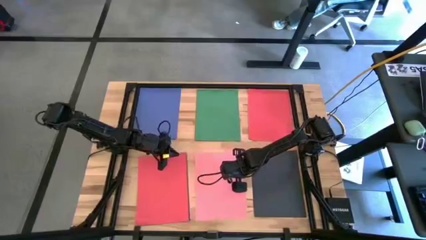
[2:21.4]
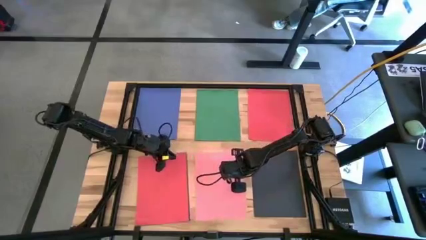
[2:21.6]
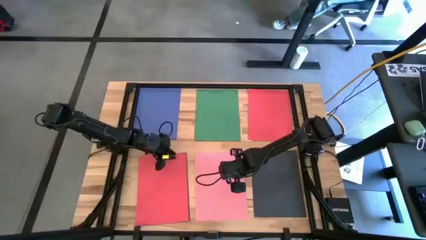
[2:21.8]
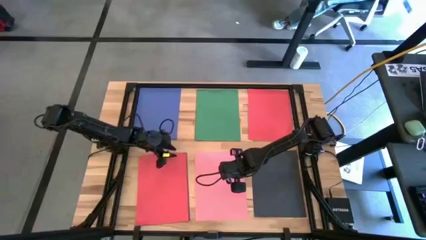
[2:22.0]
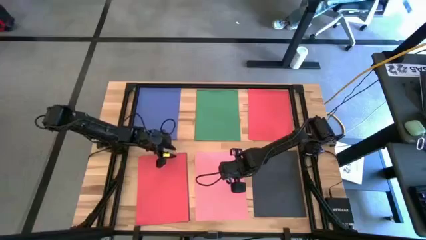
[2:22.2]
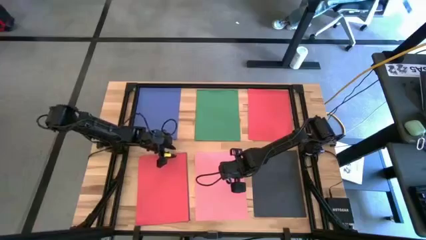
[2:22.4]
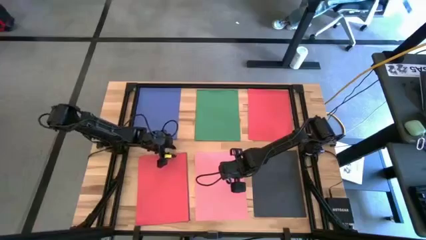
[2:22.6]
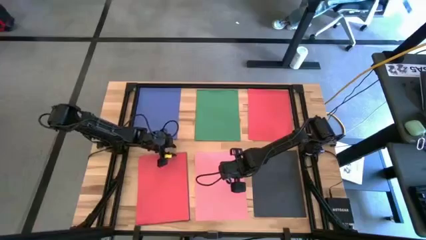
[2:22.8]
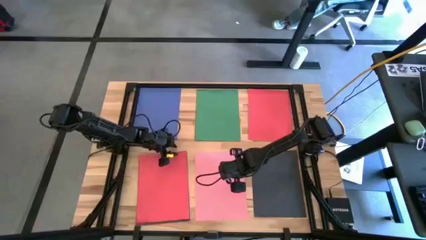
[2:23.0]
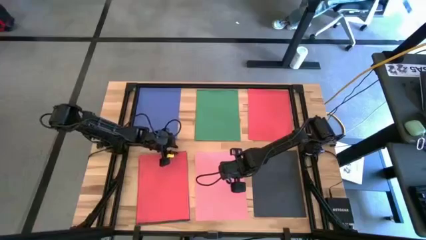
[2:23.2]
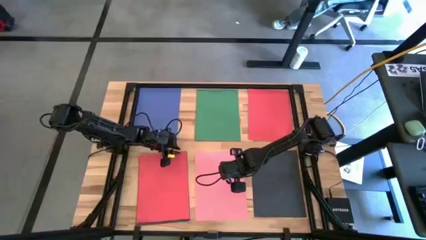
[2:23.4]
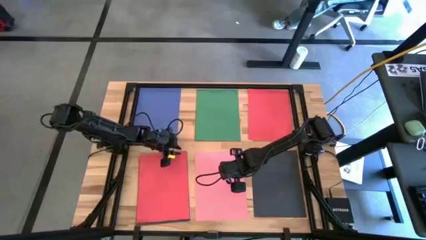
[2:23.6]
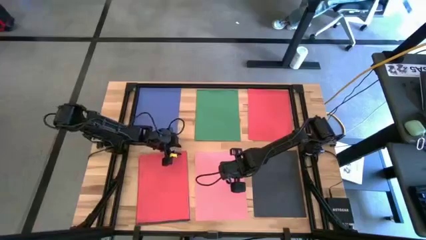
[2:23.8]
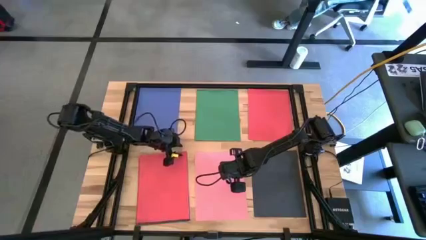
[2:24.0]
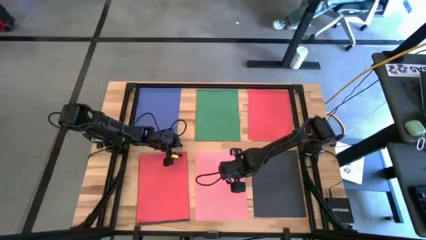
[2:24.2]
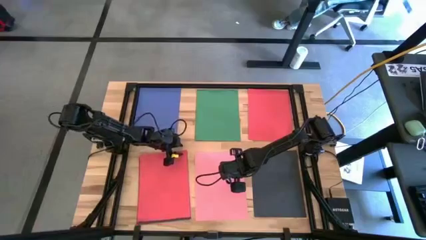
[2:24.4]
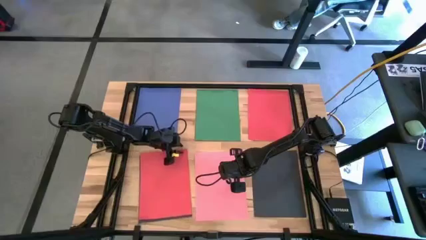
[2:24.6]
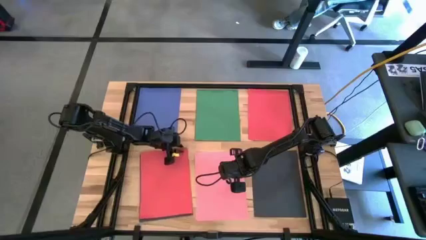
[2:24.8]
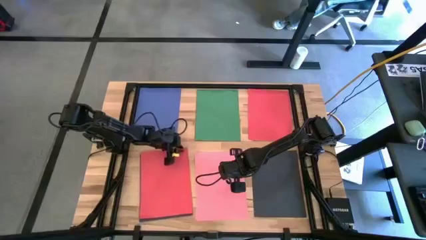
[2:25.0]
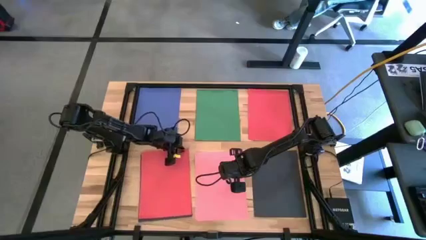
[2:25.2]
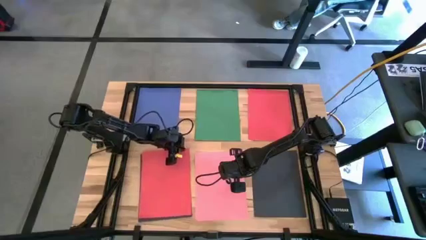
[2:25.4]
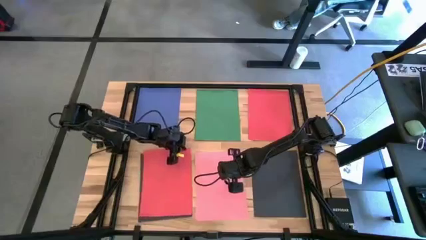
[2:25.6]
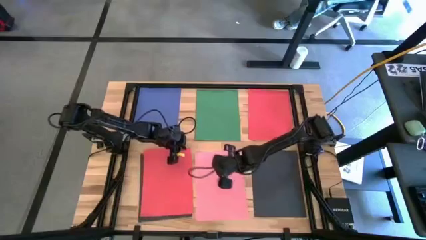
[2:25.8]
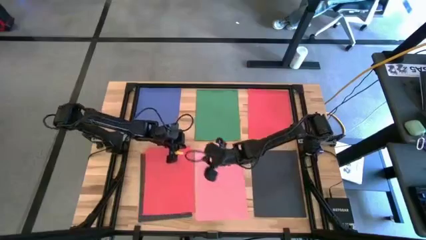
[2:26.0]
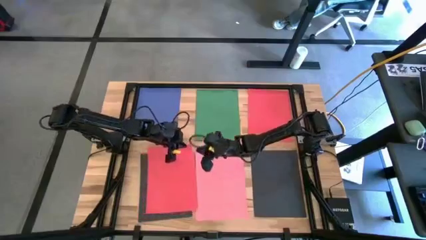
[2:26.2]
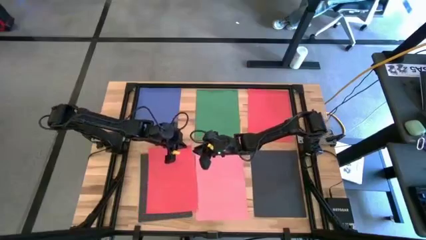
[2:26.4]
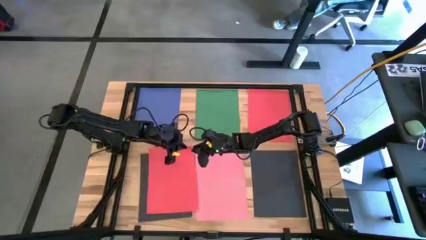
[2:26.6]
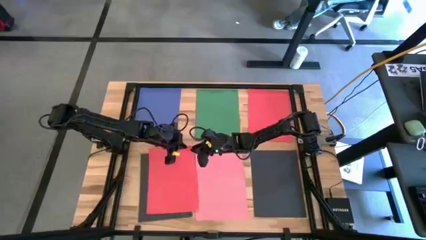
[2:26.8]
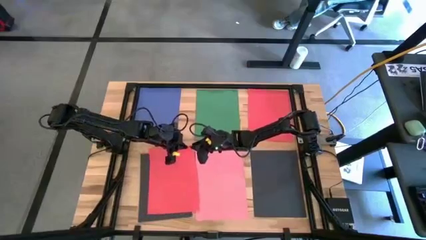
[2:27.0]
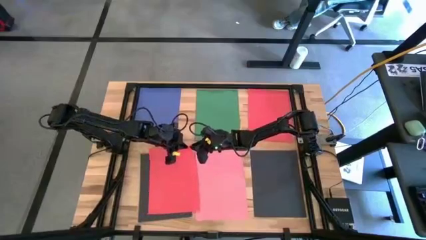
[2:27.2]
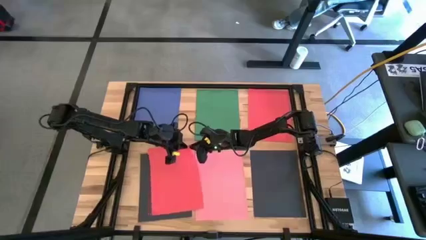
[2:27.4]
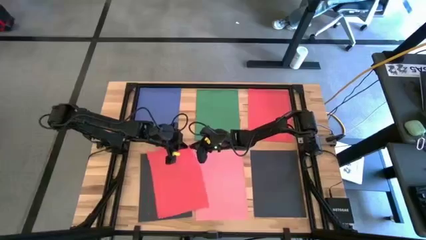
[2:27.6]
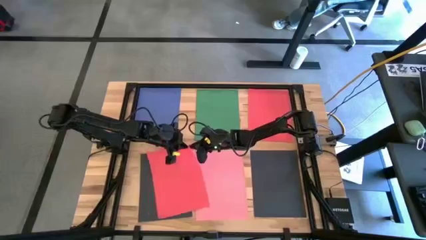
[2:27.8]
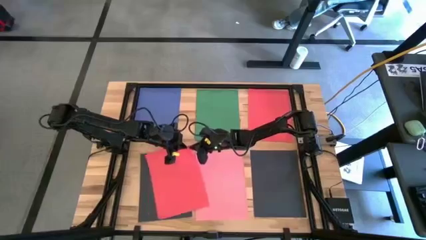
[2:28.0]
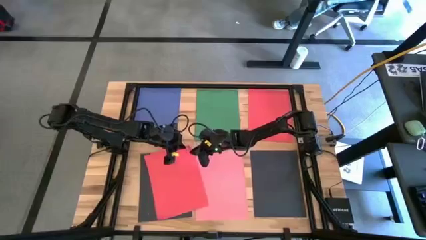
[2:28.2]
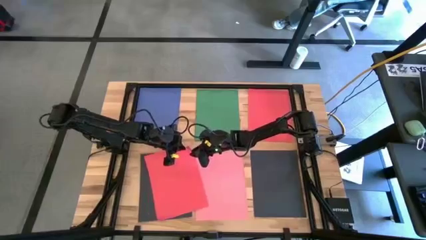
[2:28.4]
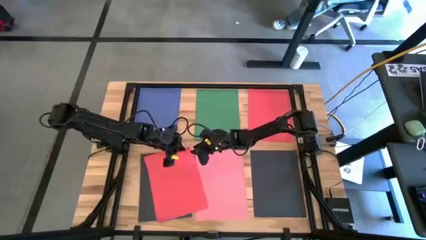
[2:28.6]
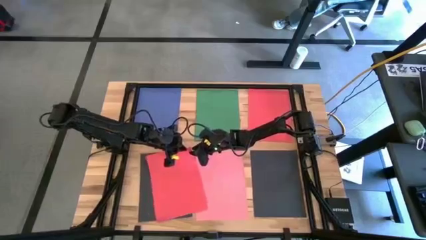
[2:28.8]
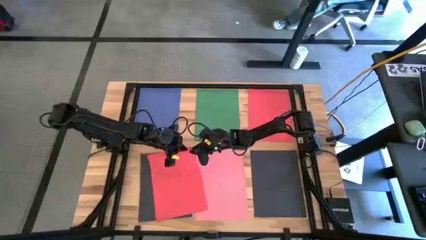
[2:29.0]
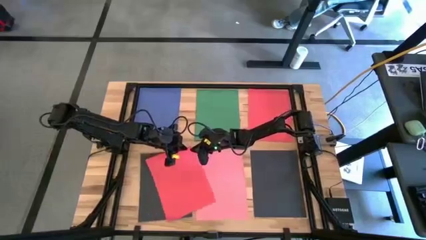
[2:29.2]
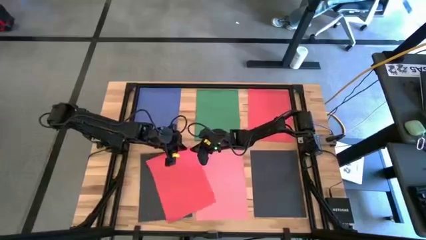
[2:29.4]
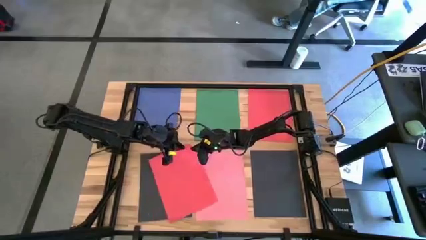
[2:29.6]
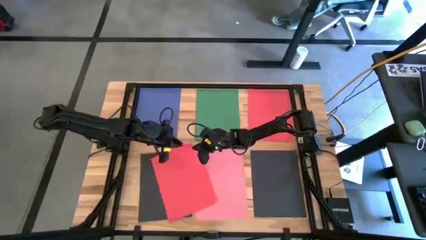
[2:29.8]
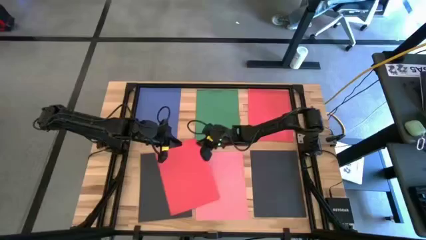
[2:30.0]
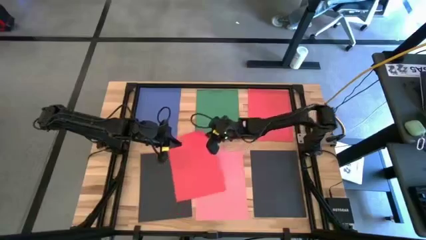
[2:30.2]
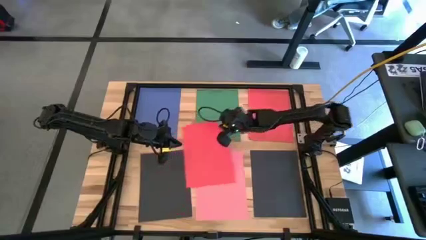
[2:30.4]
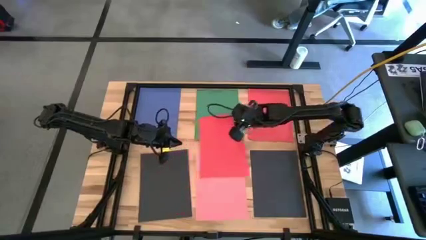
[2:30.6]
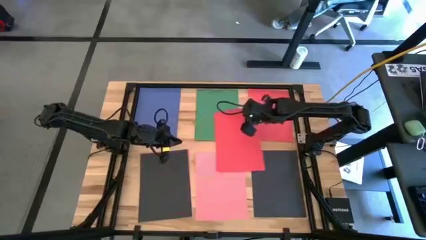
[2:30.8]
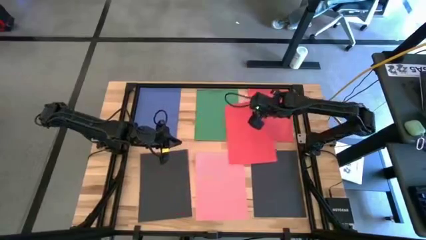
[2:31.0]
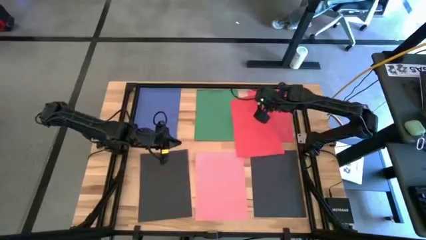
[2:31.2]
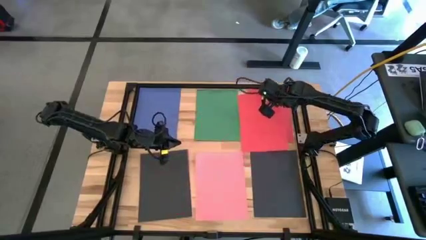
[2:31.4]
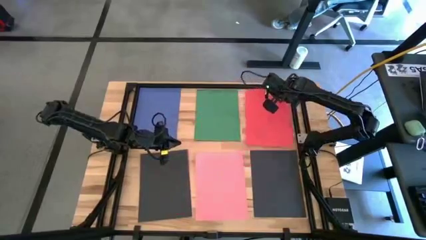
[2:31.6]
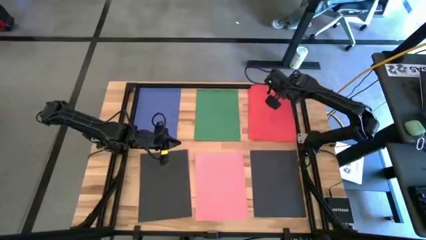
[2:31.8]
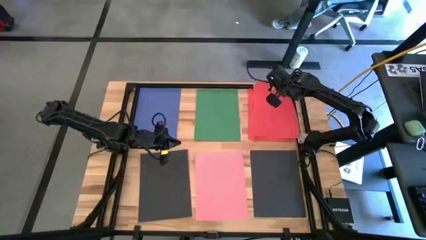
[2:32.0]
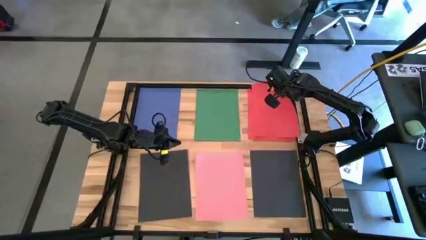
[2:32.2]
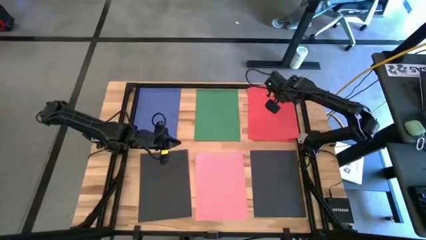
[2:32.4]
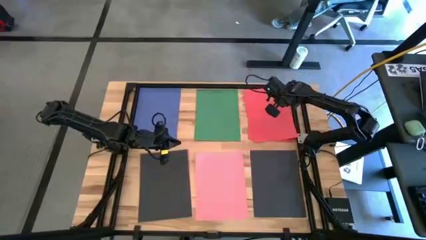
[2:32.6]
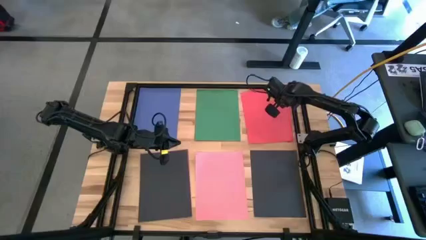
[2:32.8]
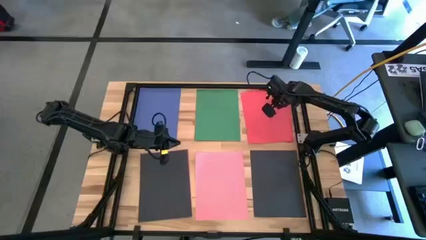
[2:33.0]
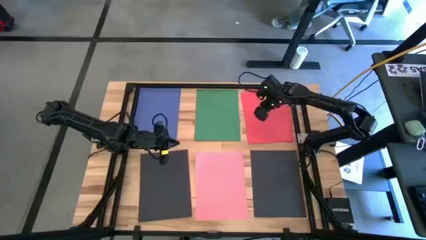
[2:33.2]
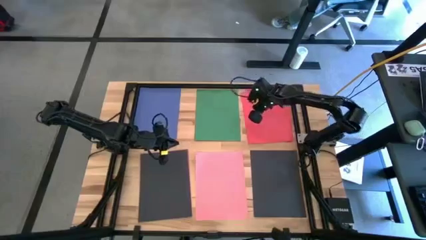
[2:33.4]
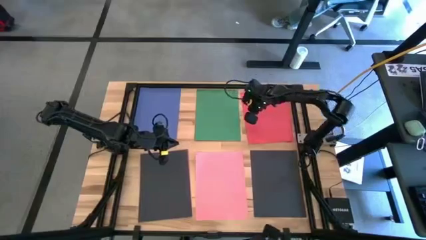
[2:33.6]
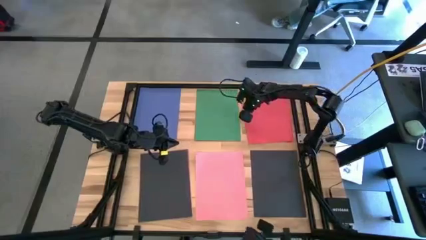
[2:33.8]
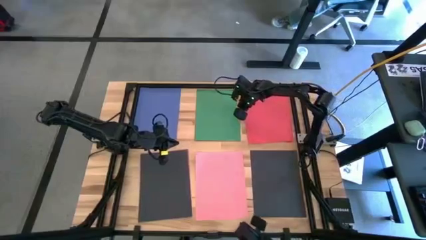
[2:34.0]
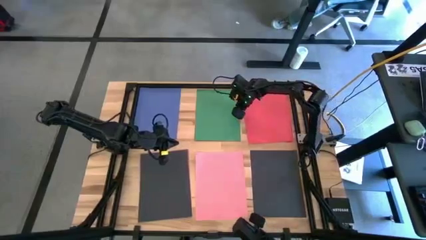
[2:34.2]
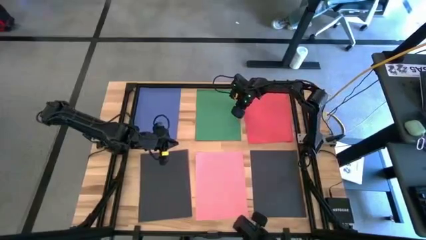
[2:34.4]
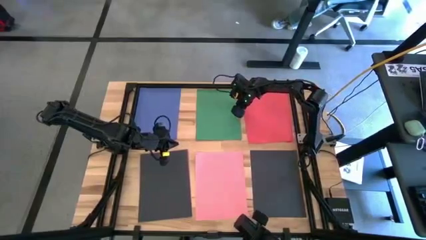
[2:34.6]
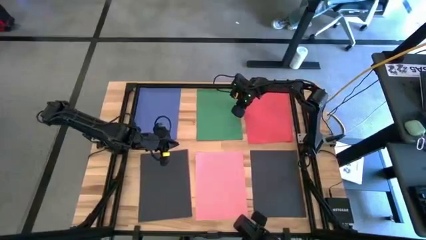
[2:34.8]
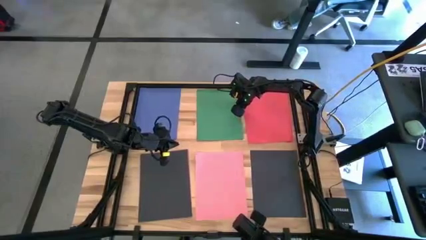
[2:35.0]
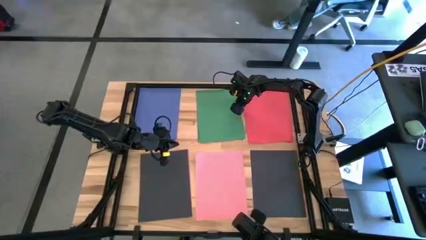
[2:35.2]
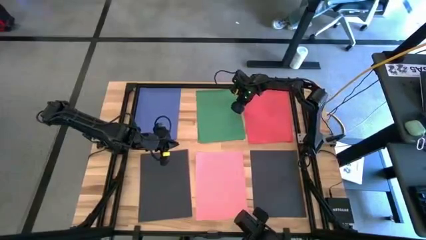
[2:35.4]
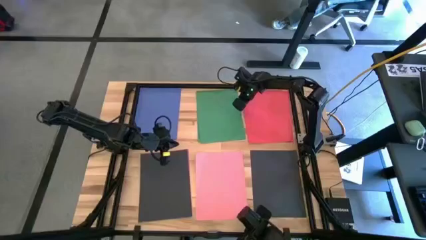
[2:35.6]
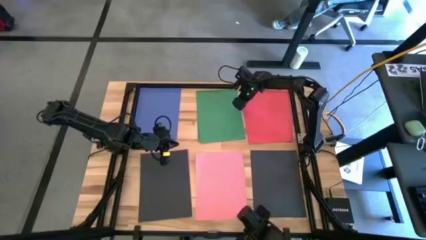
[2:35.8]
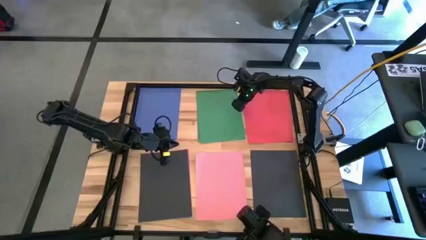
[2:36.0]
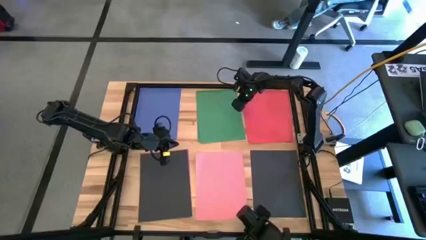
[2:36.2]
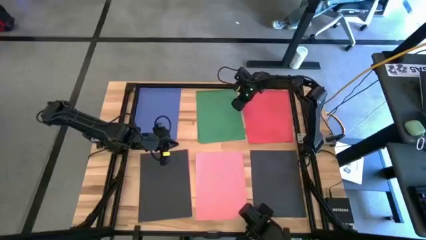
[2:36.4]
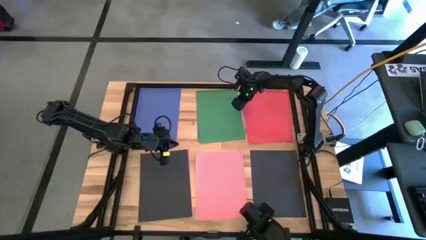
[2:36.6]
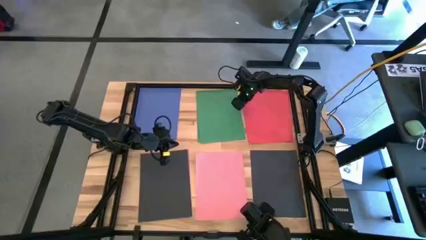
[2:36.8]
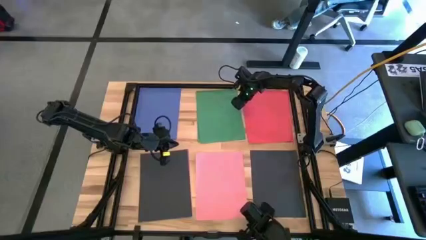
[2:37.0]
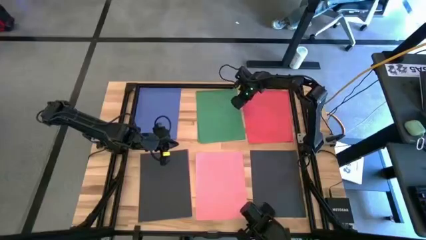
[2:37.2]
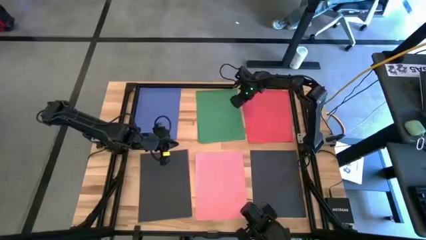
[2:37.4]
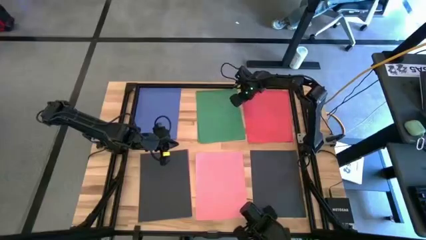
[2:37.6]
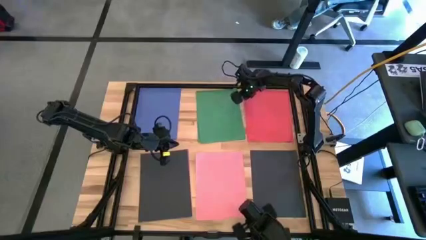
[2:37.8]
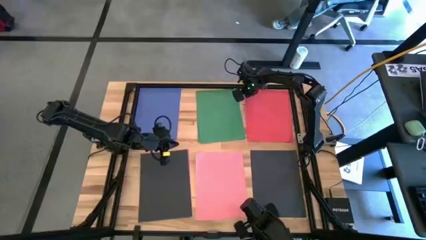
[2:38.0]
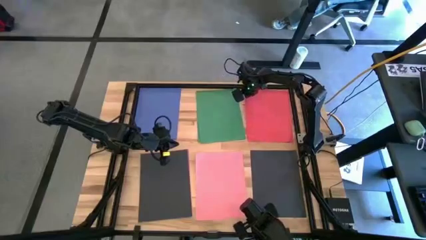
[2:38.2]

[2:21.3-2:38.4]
Task: Organize paper
Stack the red paper on top of the other red paper
